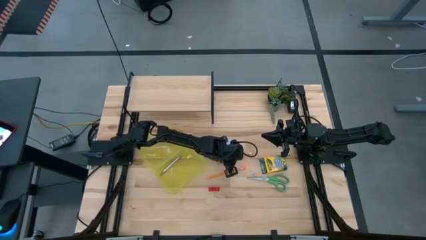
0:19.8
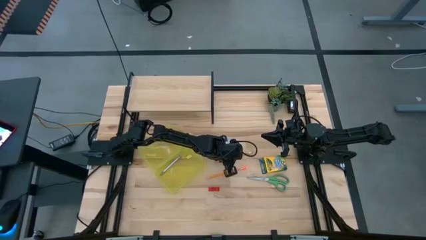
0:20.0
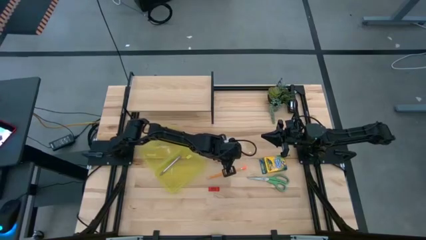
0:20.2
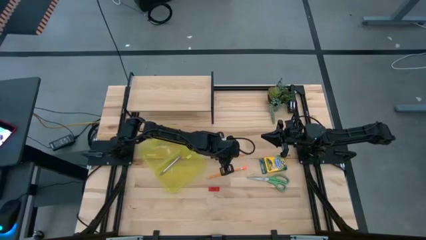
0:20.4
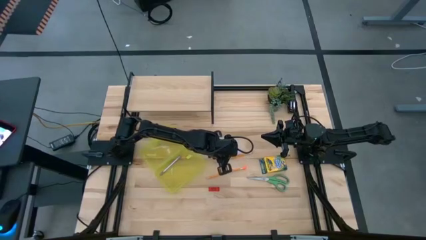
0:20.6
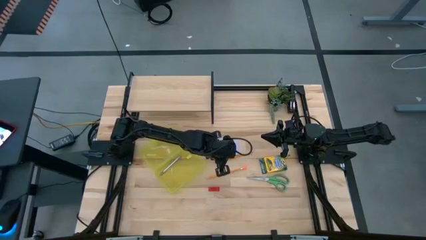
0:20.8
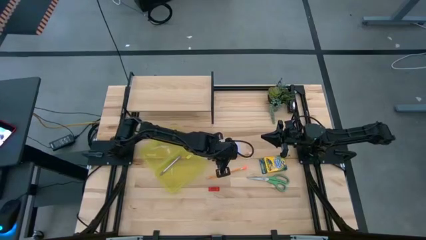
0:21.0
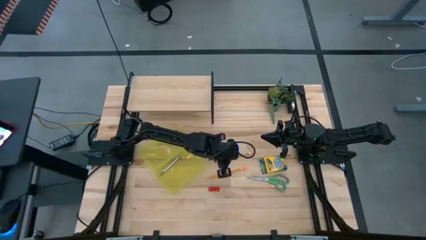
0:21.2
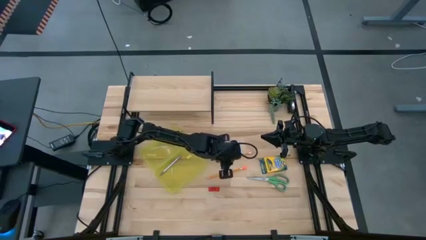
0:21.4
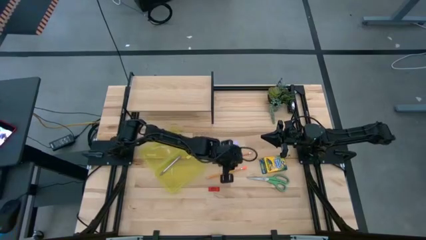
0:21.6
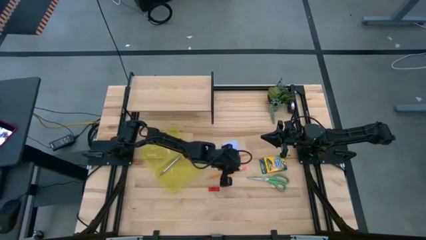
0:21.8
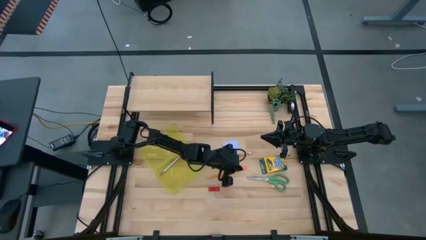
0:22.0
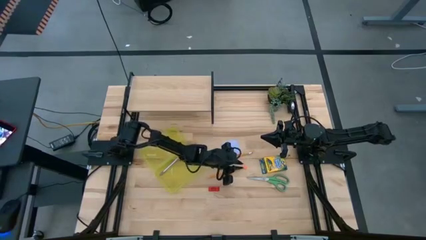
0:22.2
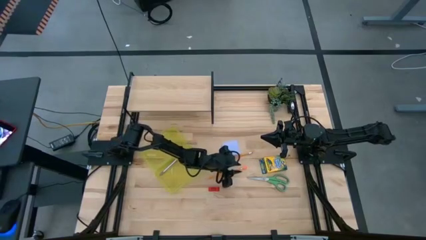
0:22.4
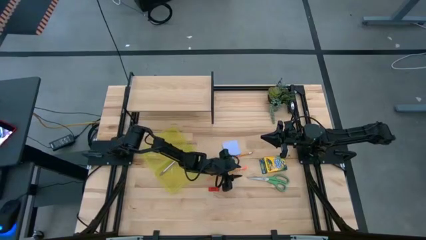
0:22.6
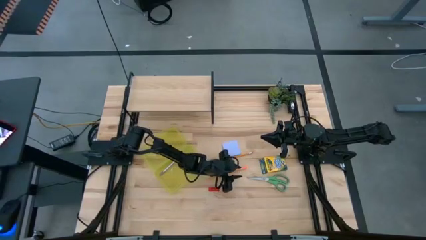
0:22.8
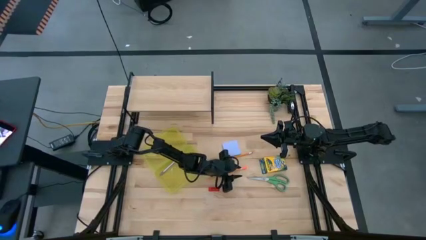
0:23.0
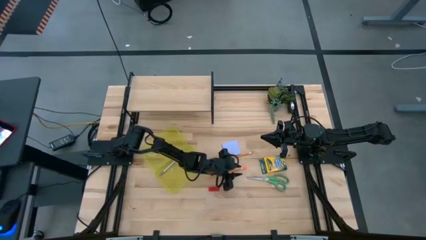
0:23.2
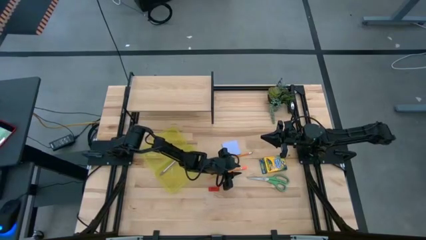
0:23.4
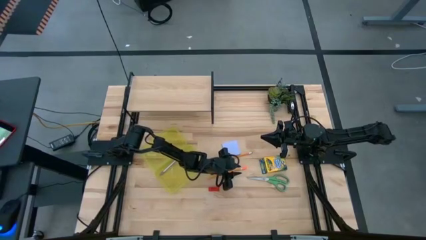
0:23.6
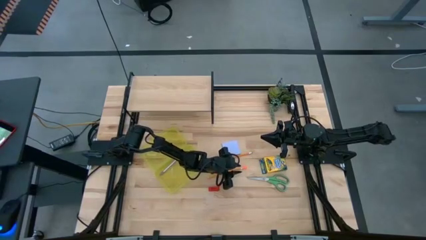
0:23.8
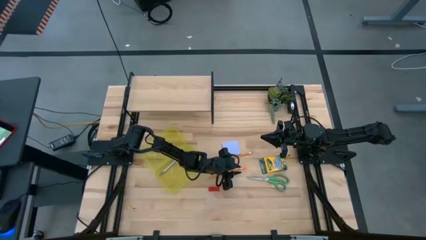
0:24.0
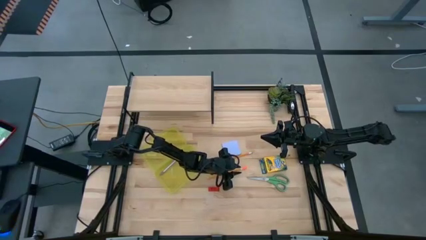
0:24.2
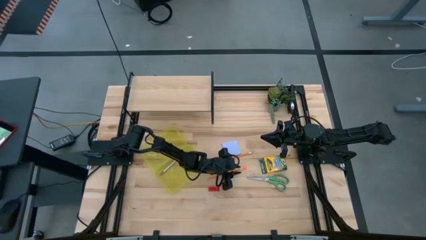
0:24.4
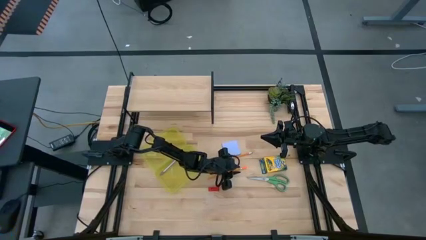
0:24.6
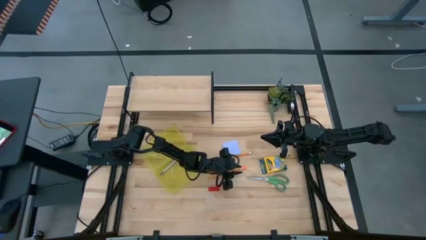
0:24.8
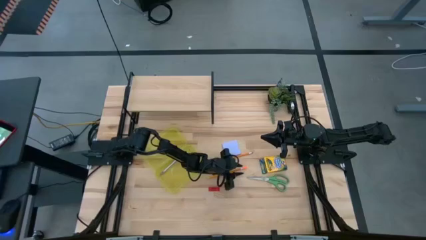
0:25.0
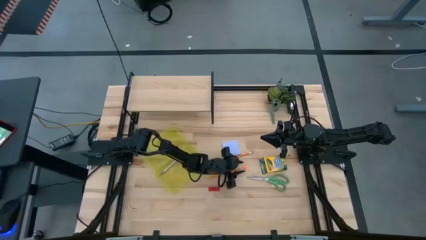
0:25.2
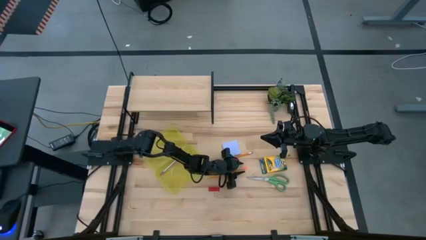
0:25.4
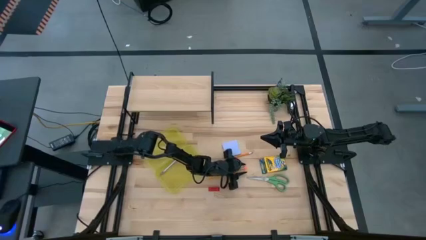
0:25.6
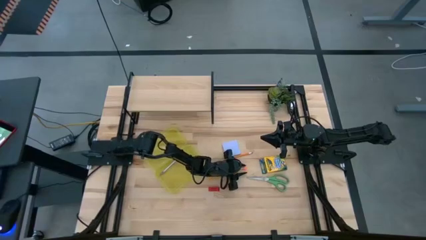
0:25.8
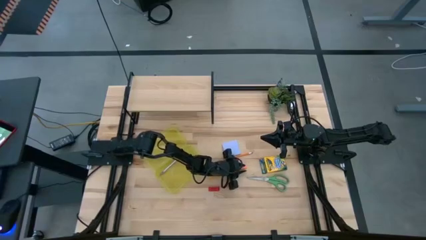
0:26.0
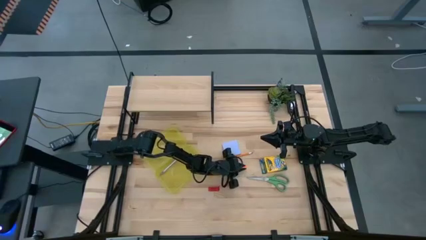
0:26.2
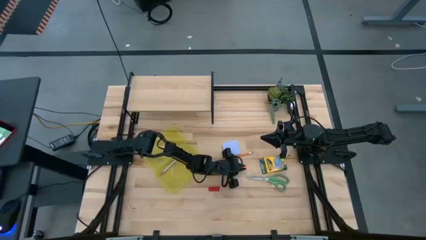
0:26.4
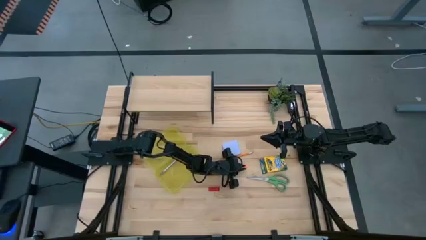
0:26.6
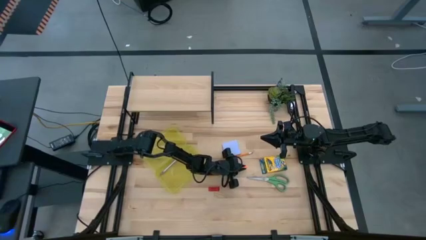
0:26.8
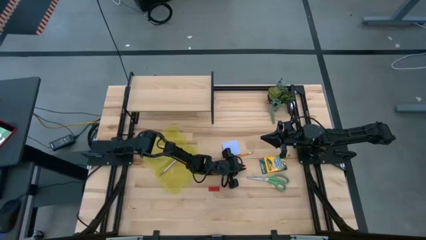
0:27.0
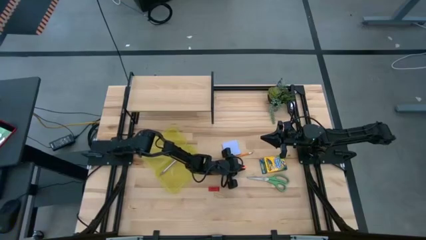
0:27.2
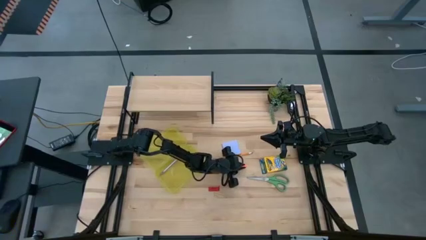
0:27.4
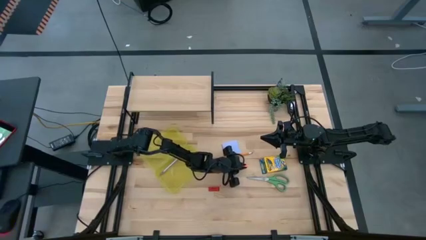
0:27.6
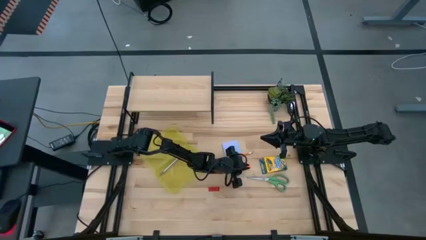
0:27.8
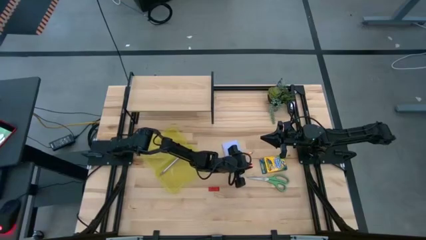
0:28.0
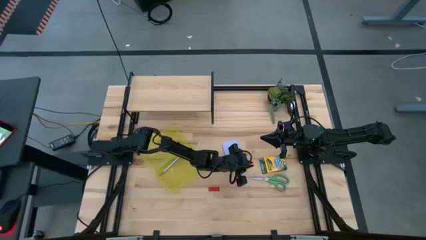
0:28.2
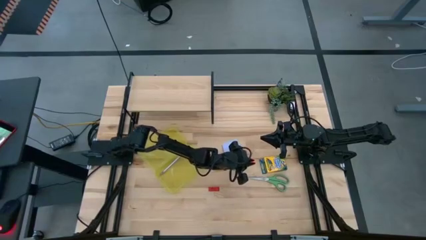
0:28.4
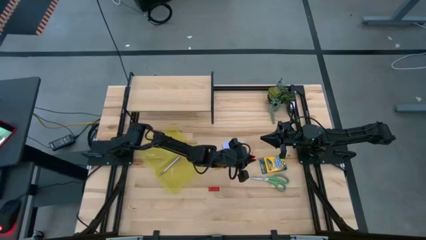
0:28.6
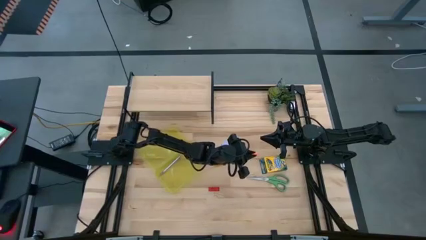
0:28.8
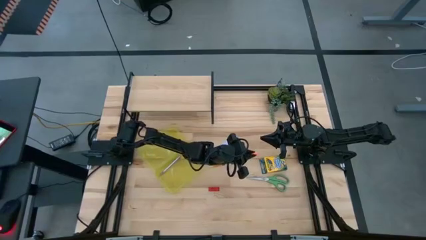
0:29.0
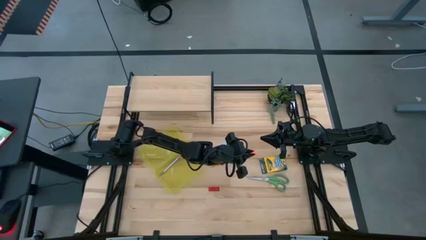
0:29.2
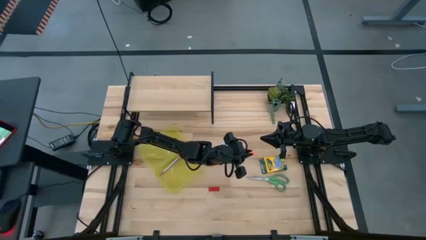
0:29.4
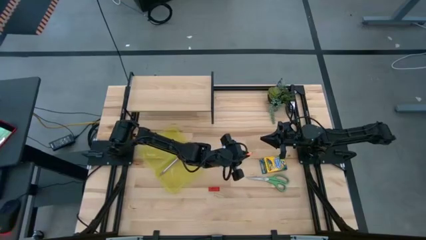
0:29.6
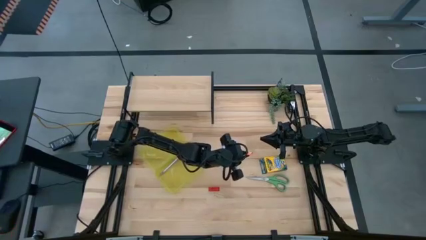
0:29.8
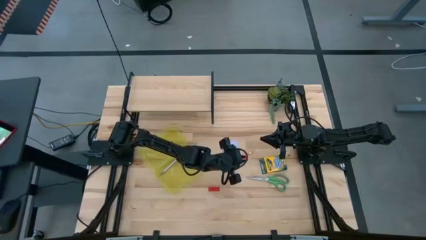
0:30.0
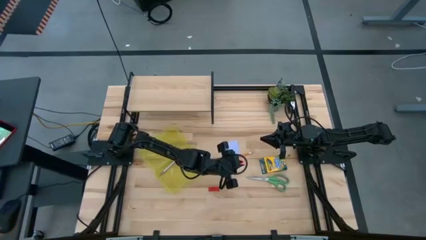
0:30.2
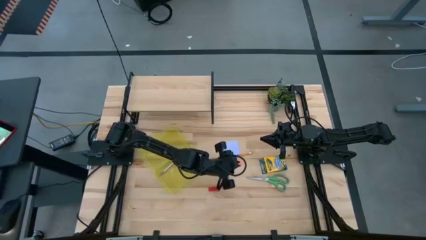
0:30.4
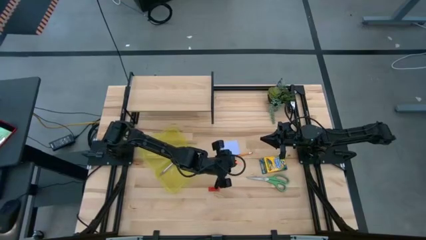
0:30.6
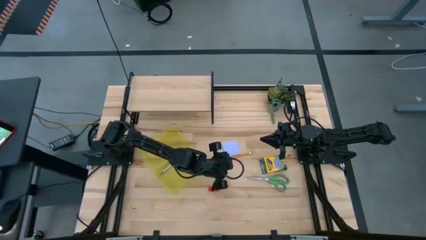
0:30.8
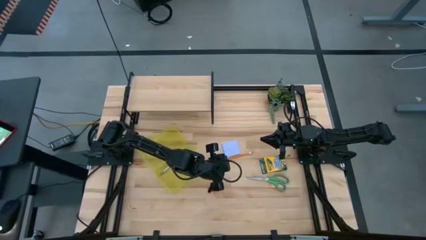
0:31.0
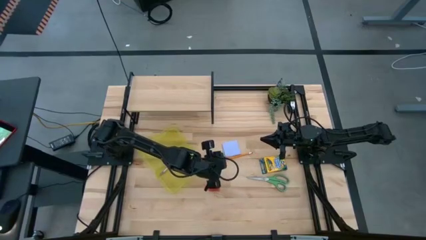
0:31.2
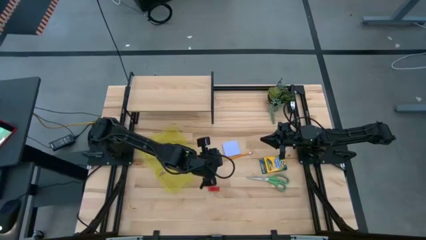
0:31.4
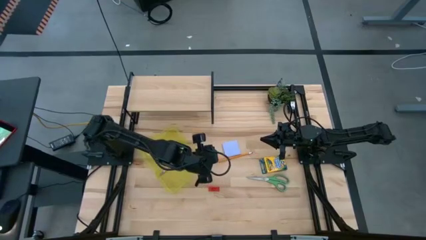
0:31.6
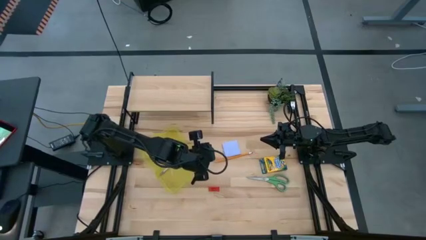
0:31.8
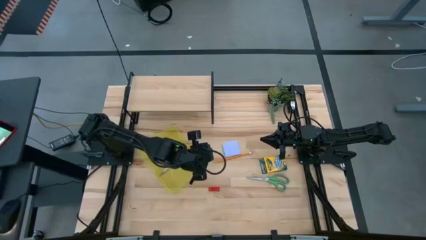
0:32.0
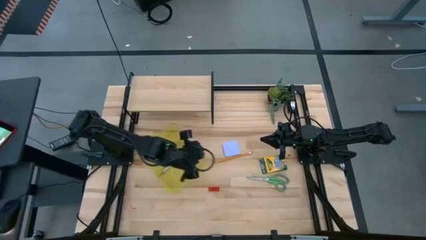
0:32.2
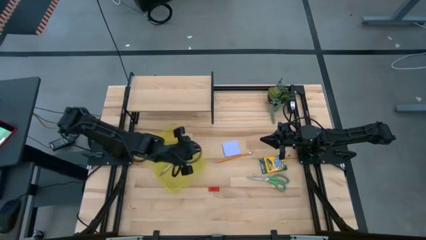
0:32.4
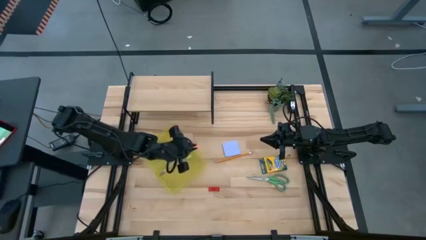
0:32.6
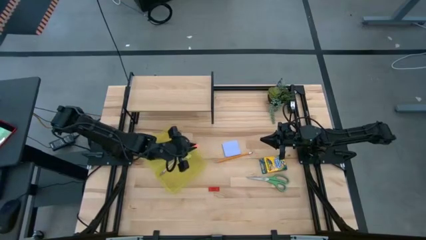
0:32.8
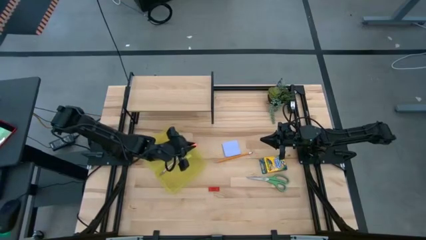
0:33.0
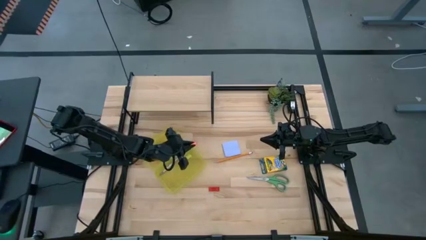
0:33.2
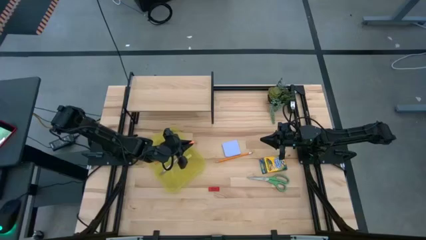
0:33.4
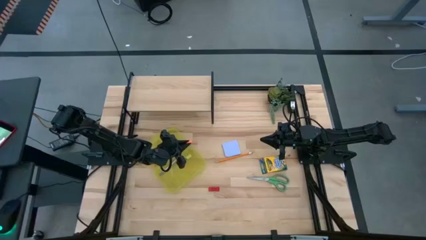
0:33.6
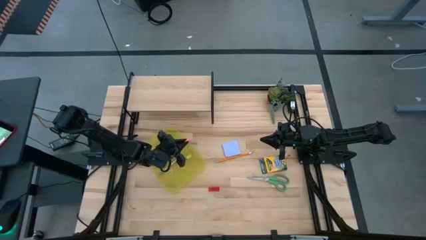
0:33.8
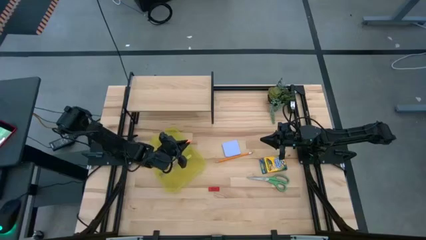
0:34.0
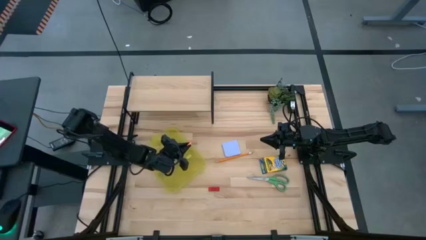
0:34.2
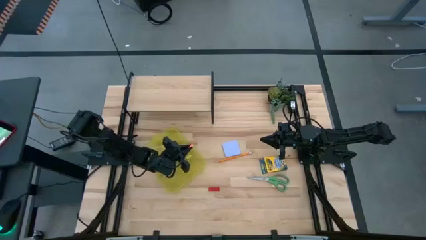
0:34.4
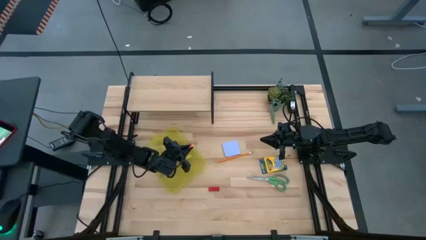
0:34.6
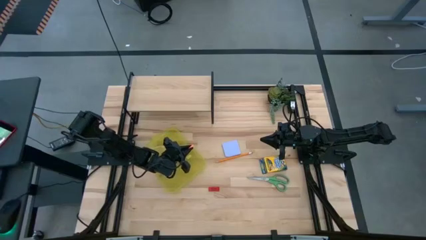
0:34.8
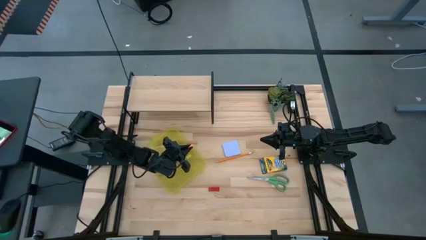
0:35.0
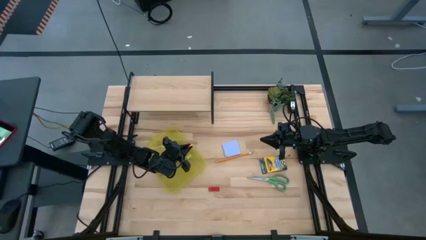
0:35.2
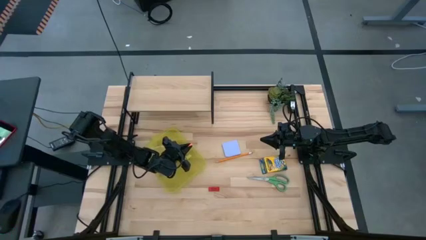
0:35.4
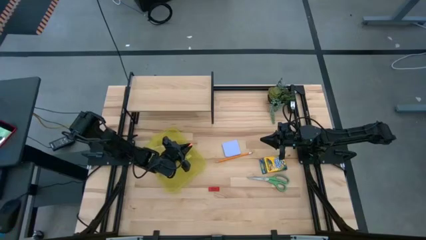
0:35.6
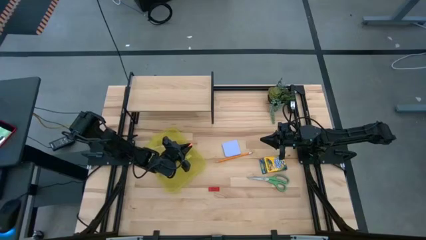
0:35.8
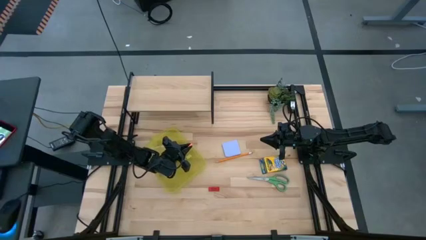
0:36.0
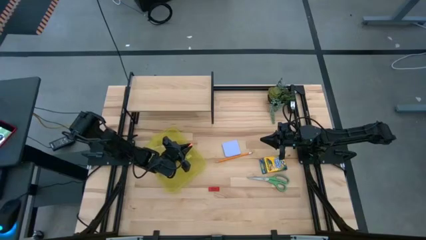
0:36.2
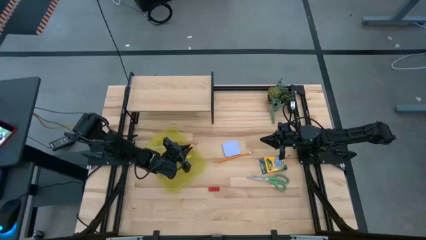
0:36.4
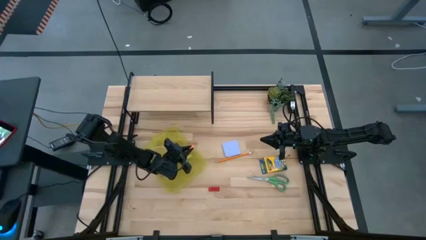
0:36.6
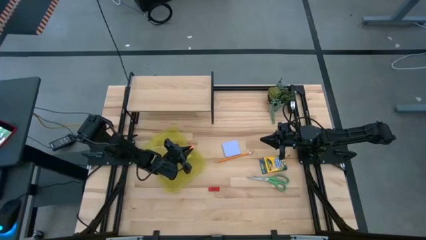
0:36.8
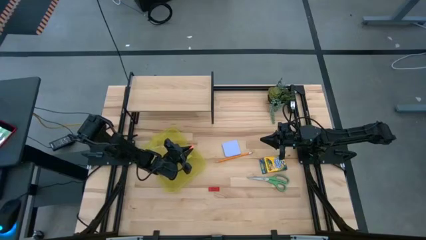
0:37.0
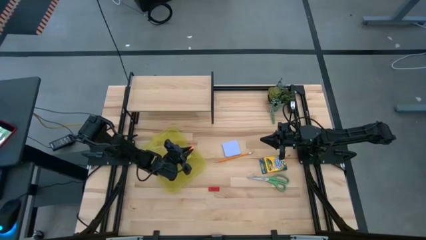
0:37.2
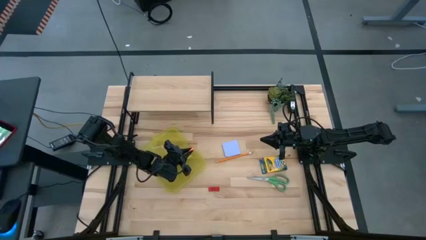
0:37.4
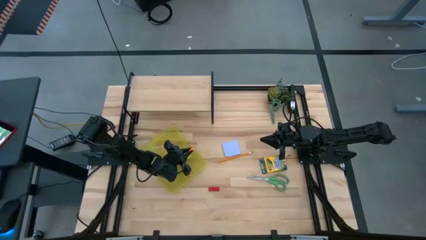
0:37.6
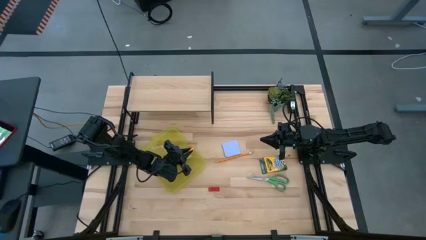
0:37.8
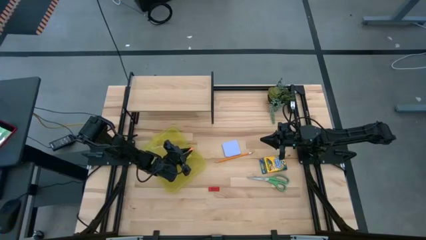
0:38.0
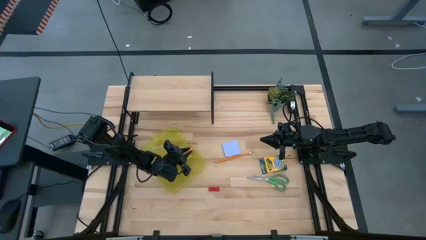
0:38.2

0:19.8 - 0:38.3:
Task: Pack school essentials
Put the bottom orange pencil into the yellow supply box
